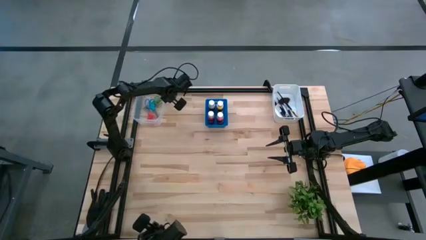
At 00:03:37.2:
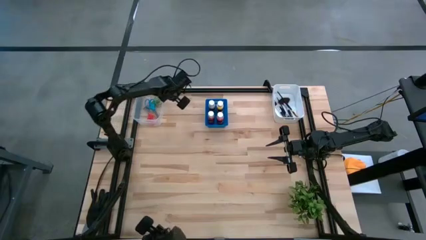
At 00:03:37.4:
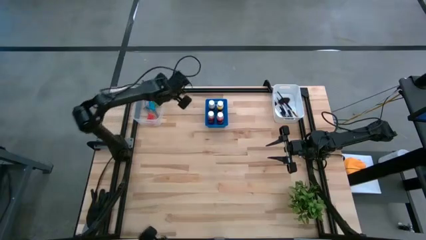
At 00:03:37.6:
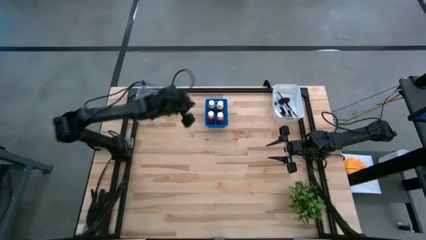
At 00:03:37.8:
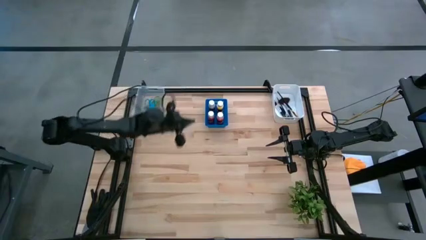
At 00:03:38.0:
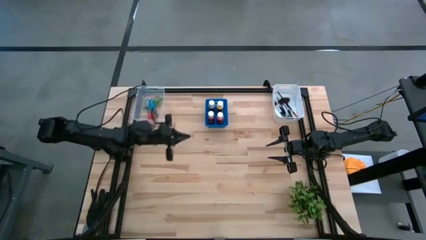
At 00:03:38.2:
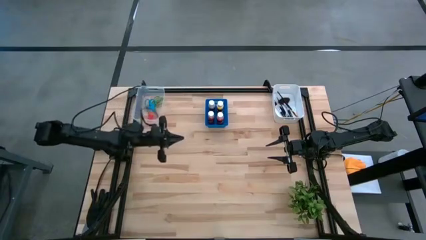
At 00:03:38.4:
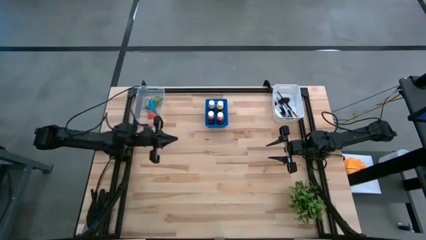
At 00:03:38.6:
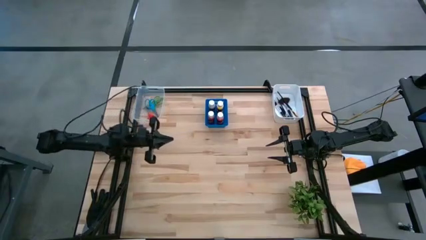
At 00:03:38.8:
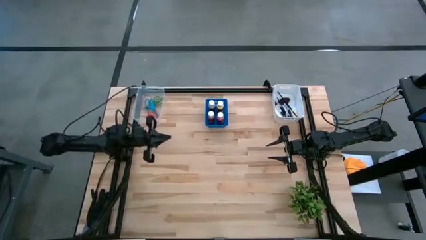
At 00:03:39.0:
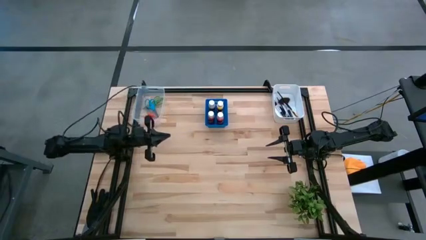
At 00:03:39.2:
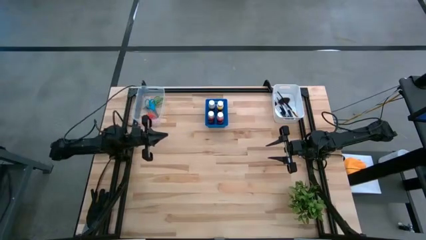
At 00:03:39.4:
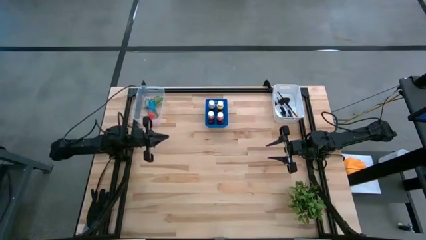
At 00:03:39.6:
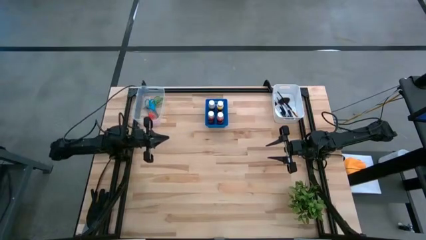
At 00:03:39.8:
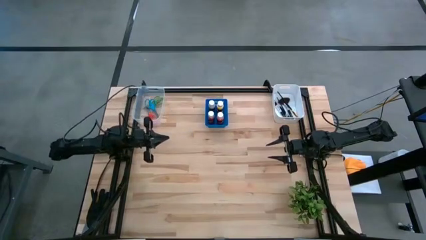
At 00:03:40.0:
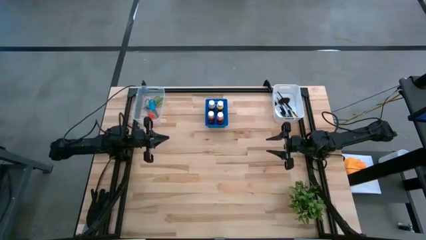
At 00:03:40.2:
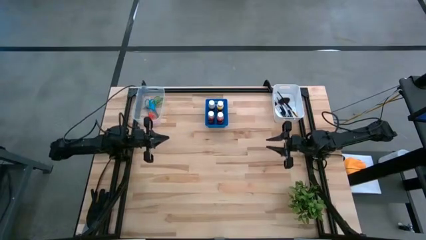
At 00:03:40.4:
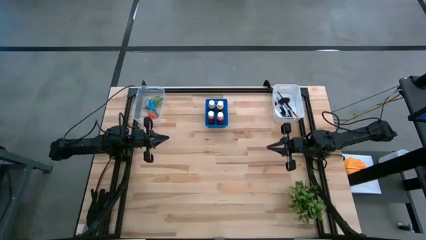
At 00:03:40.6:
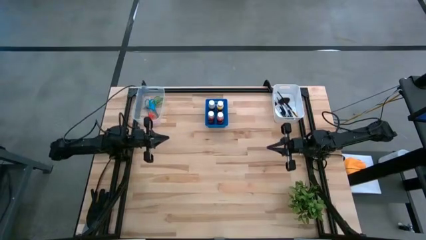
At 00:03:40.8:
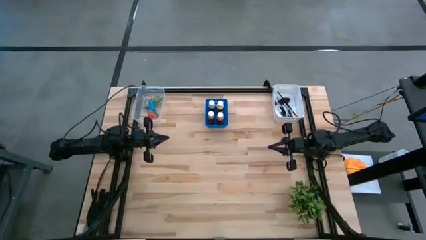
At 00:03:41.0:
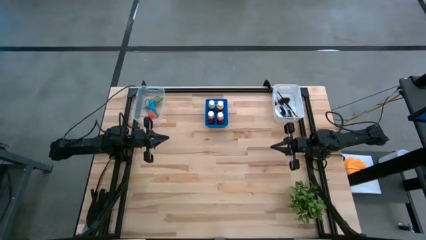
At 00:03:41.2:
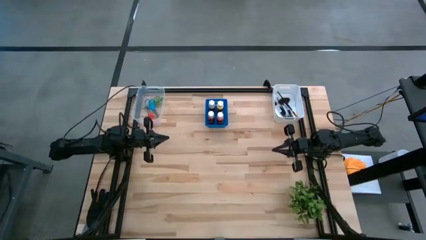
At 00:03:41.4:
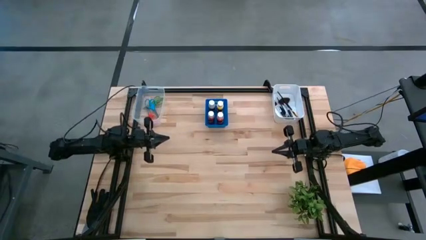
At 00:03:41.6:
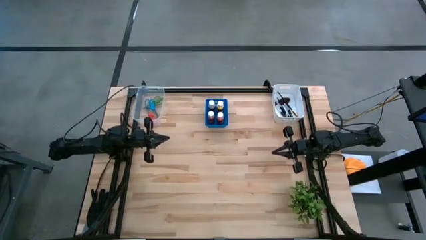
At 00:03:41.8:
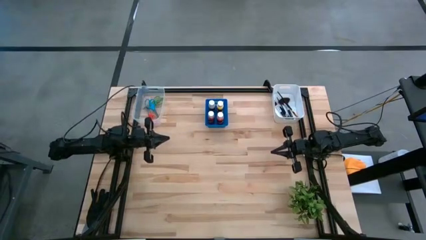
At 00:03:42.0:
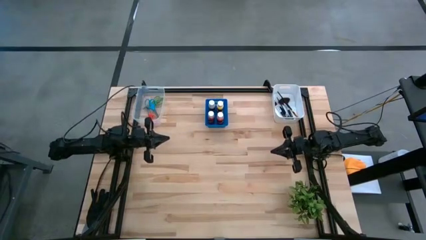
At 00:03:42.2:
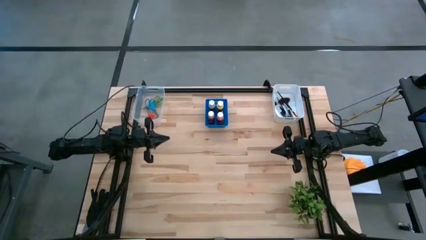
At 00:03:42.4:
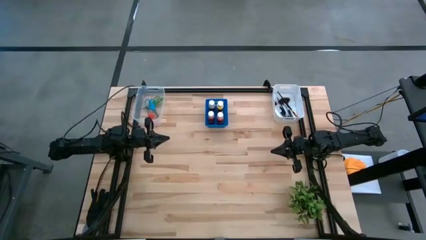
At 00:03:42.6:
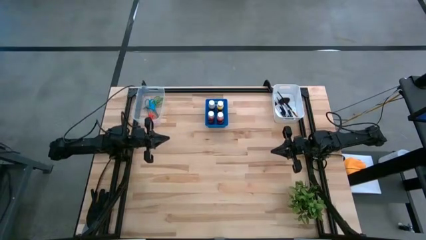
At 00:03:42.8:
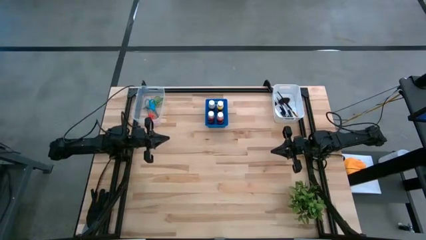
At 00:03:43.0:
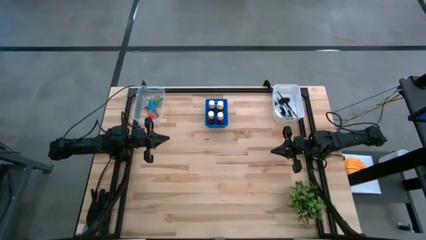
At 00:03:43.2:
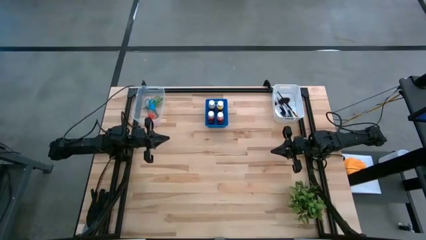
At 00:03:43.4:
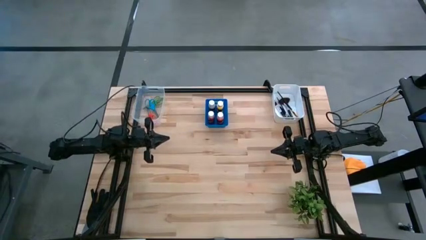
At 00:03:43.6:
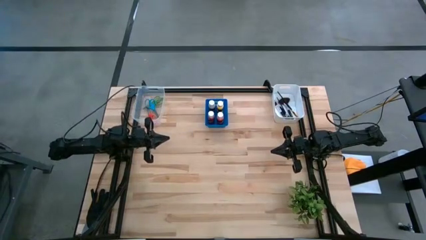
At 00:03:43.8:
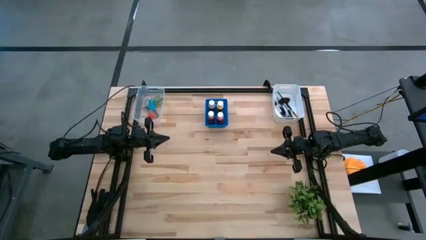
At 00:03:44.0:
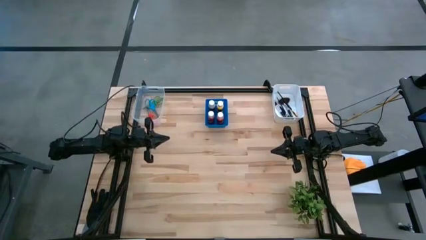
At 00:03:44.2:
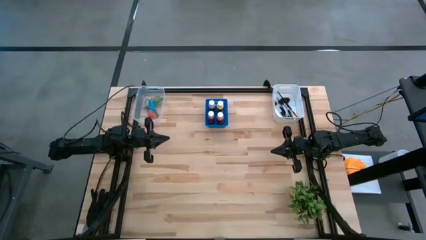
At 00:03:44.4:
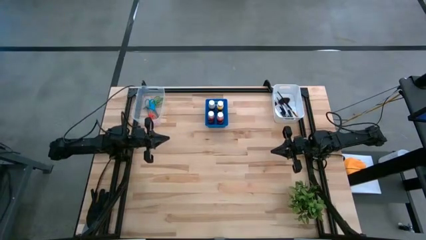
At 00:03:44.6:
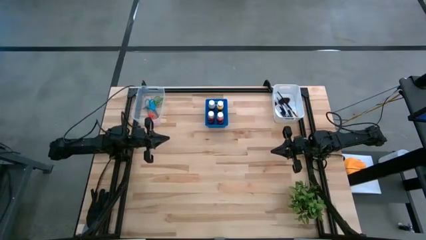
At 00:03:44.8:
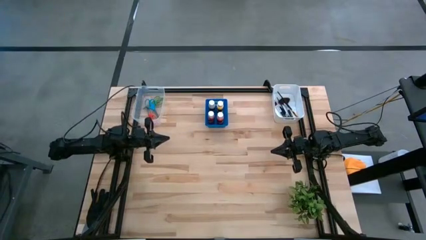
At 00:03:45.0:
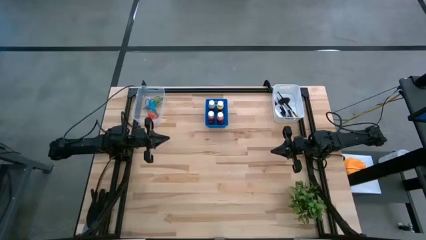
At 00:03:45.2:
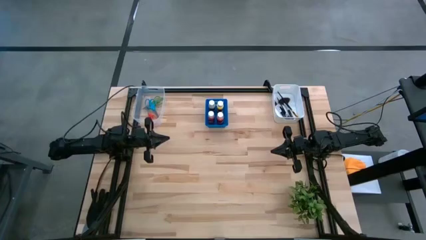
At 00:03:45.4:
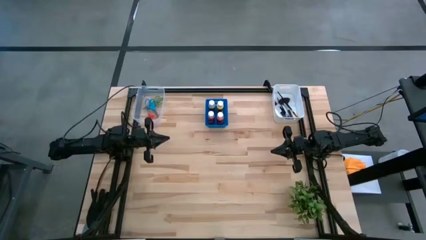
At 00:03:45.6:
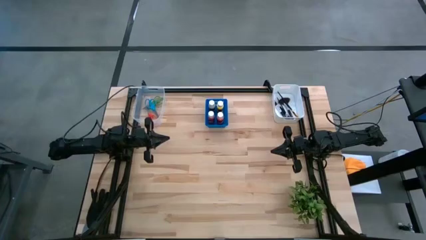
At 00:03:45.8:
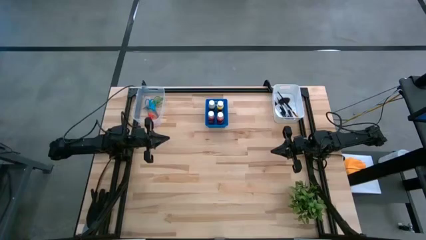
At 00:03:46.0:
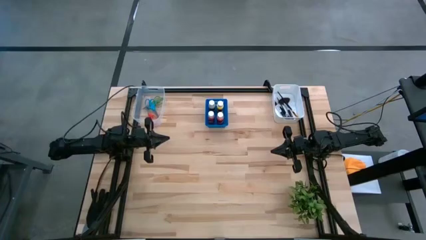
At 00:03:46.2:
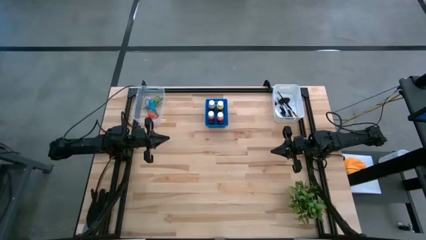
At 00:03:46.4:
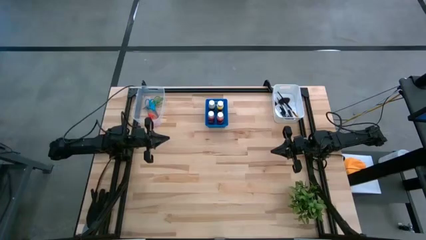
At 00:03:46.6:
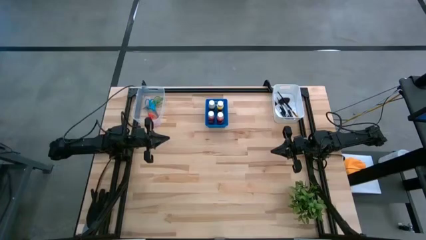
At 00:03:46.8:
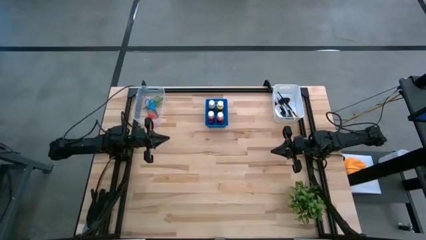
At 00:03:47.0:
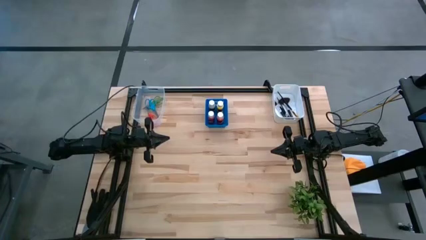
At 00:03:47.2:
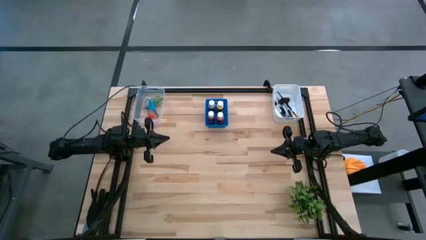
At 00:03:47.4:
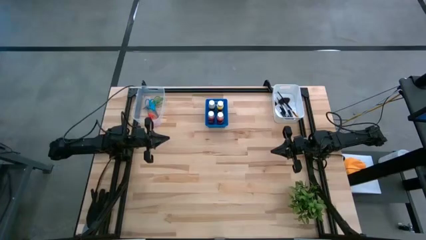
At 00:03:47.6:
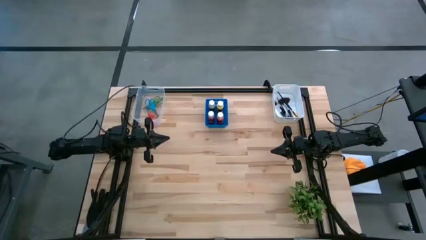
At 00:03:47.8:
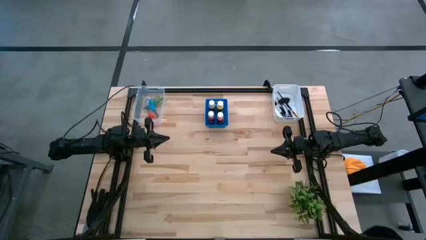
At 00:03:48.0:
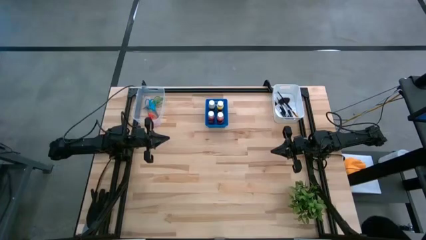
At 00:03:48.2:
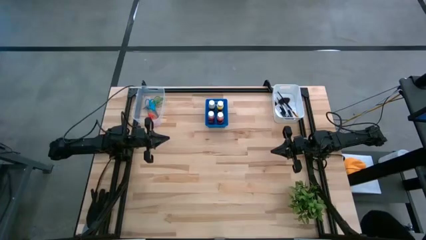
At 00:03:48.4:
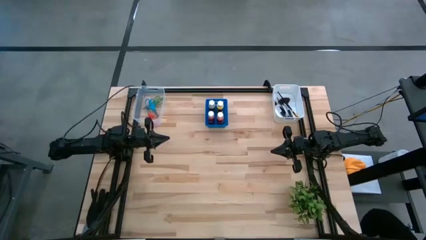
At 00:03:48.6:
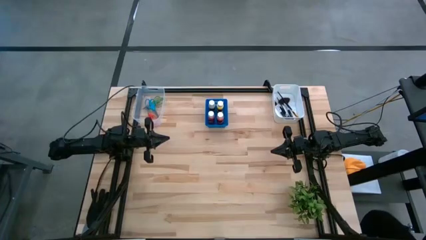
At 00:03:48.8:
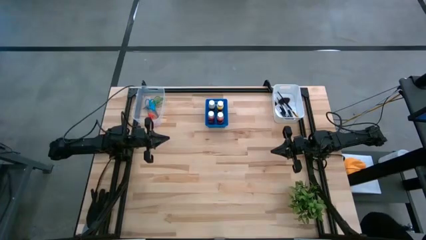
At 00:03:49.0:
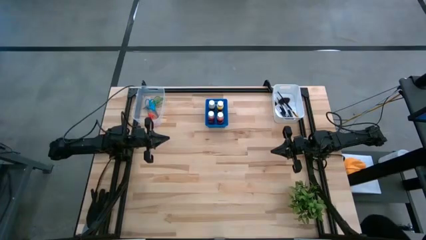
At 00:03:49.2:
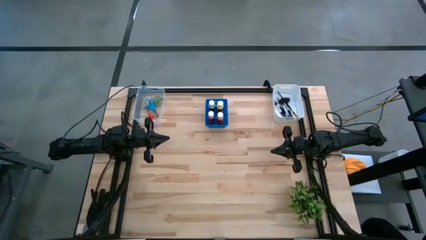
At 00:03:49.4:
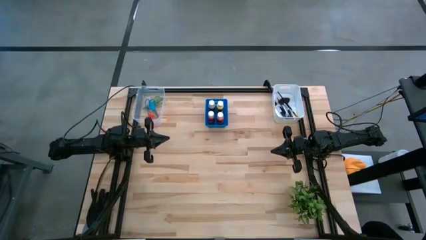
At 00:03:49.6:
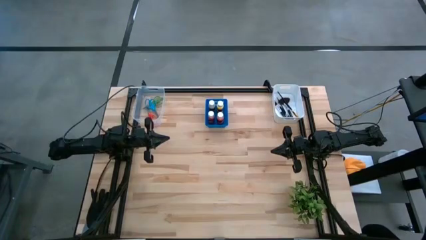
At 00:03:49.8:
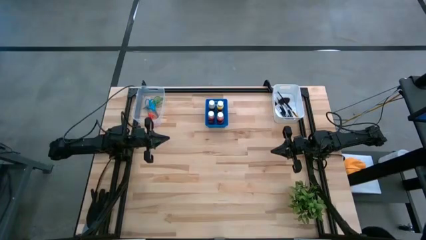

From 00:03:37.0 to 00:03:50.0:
Task: Pick & Place Paint Supplies
Return to Home Position
